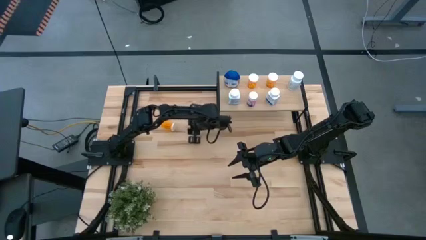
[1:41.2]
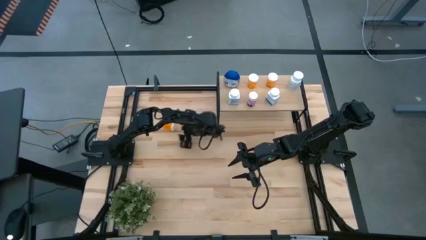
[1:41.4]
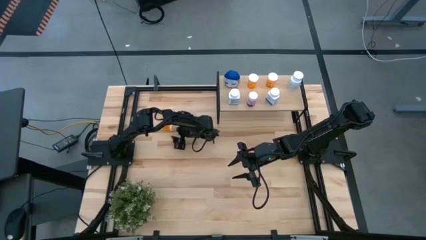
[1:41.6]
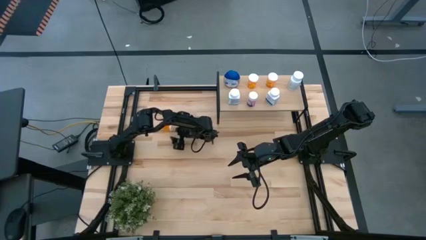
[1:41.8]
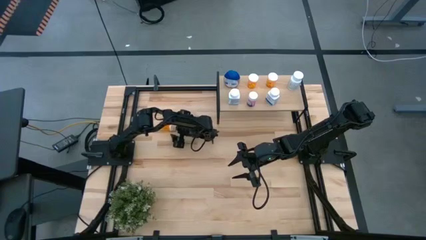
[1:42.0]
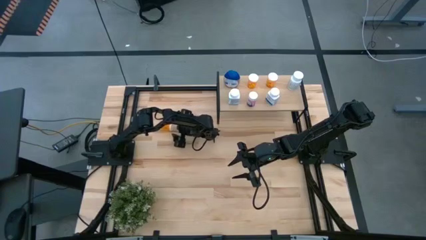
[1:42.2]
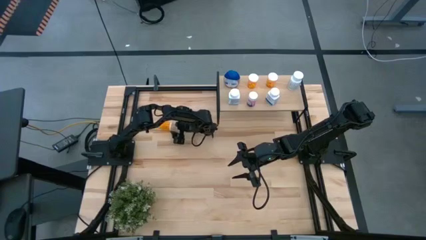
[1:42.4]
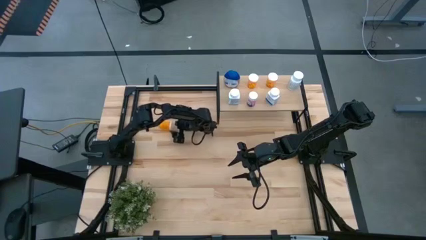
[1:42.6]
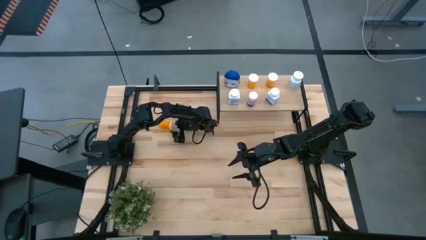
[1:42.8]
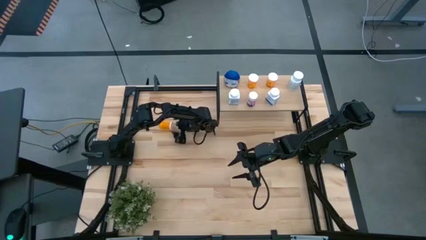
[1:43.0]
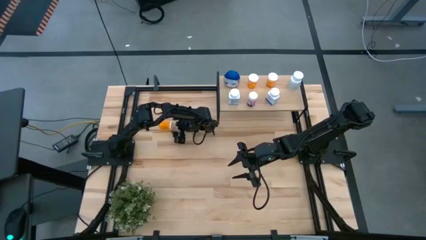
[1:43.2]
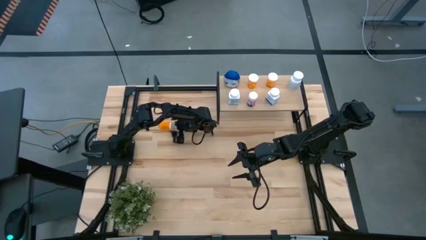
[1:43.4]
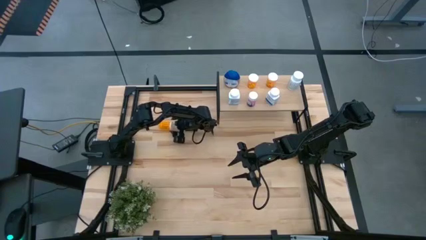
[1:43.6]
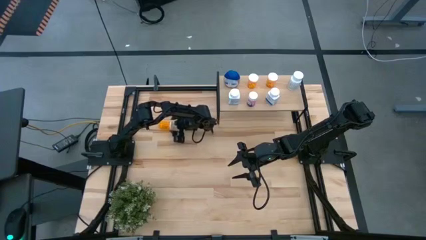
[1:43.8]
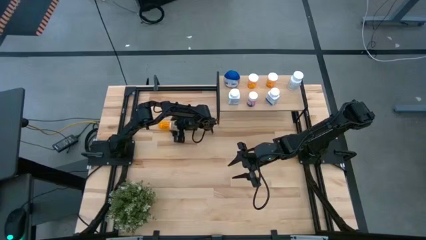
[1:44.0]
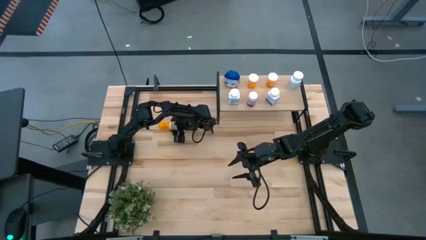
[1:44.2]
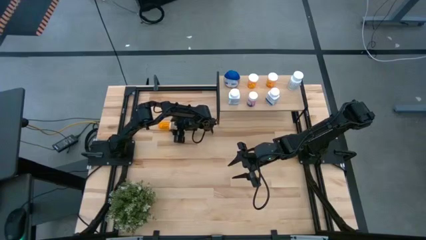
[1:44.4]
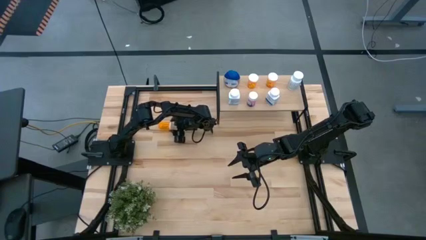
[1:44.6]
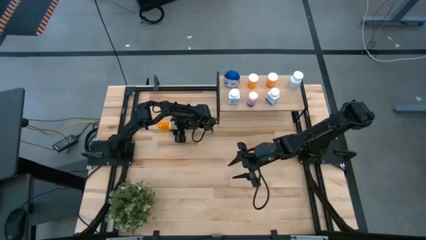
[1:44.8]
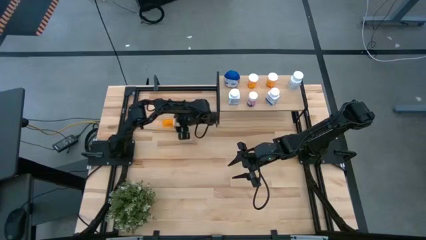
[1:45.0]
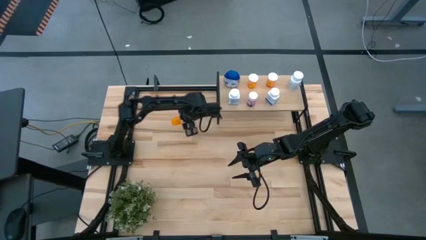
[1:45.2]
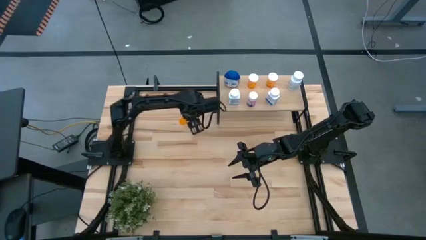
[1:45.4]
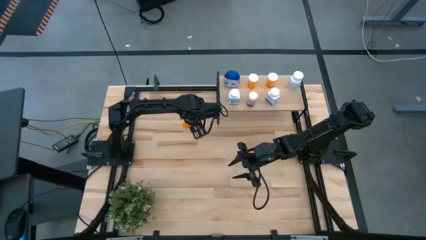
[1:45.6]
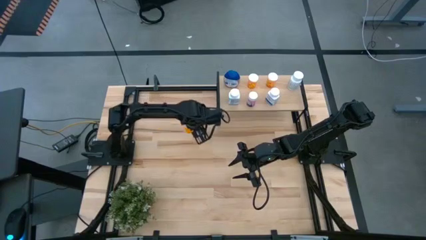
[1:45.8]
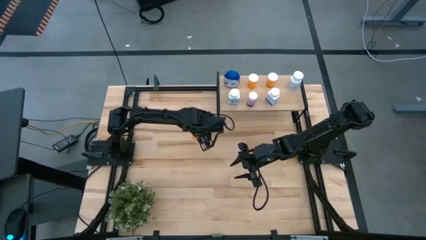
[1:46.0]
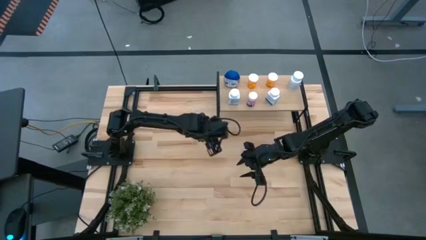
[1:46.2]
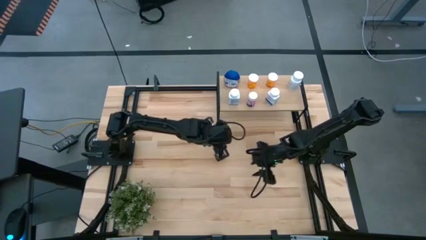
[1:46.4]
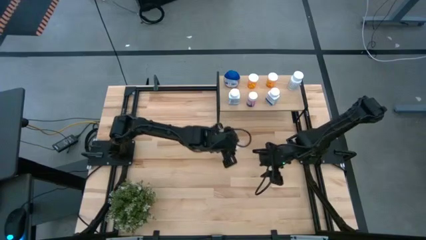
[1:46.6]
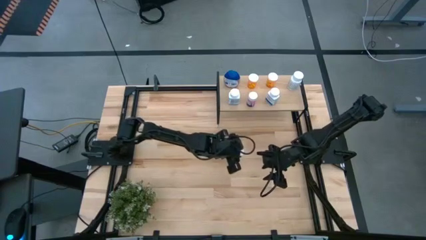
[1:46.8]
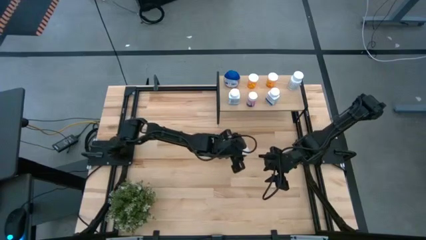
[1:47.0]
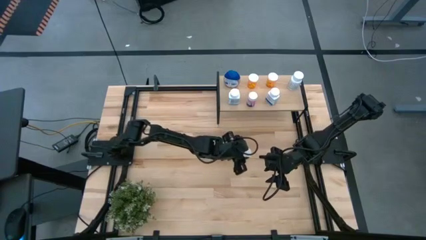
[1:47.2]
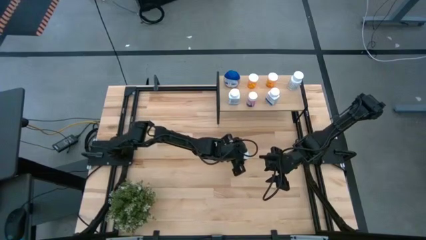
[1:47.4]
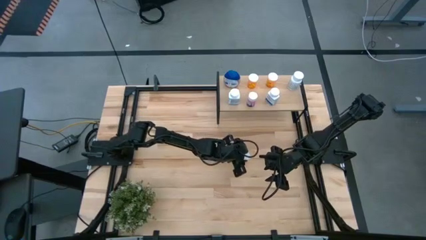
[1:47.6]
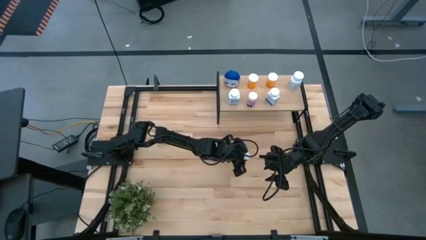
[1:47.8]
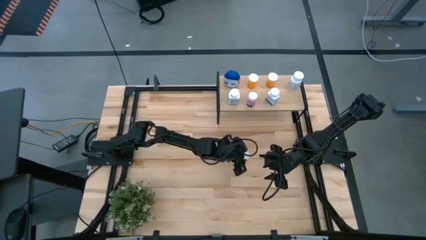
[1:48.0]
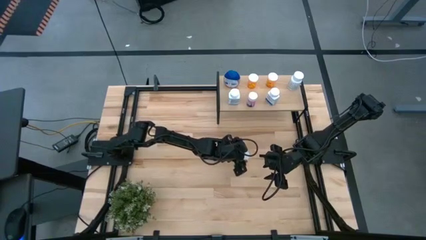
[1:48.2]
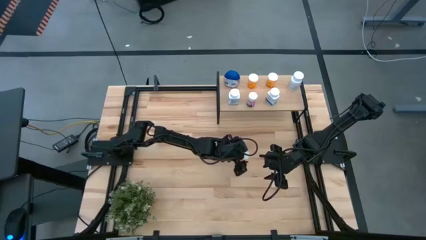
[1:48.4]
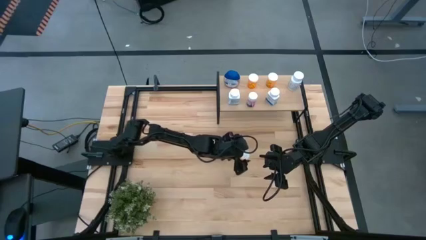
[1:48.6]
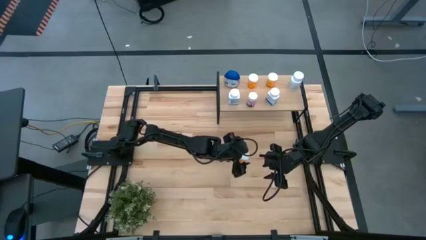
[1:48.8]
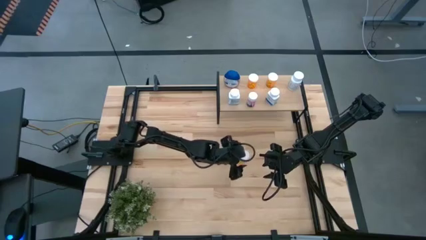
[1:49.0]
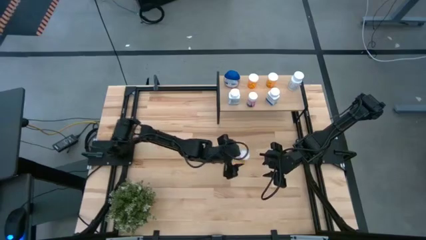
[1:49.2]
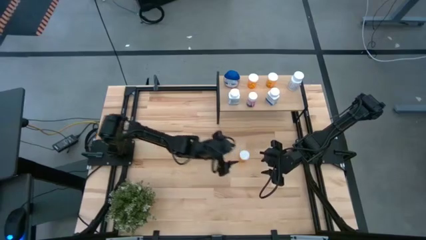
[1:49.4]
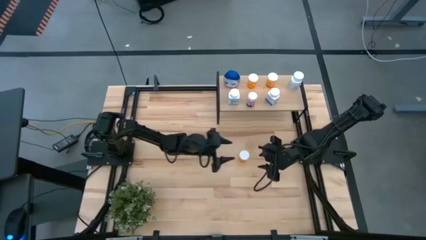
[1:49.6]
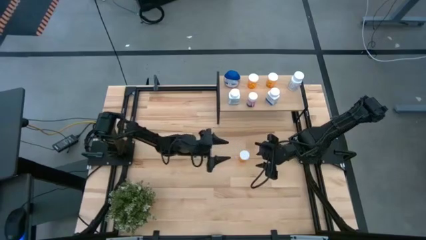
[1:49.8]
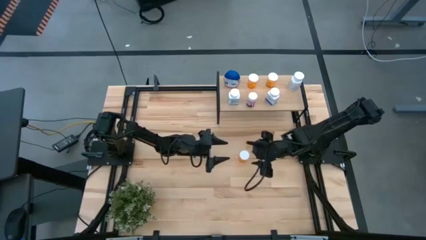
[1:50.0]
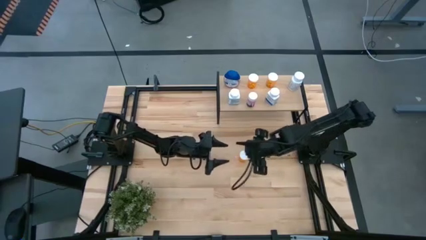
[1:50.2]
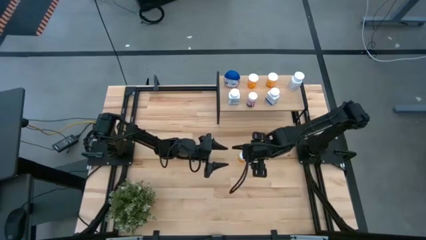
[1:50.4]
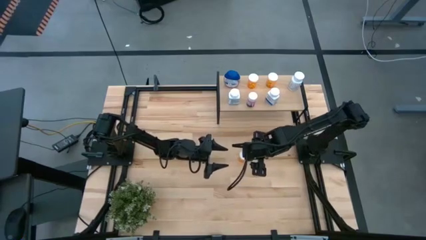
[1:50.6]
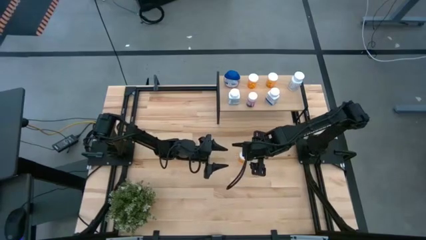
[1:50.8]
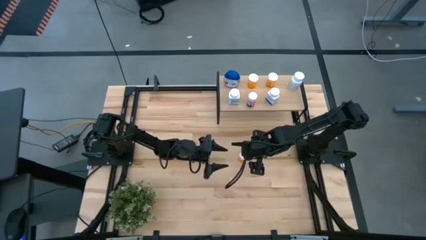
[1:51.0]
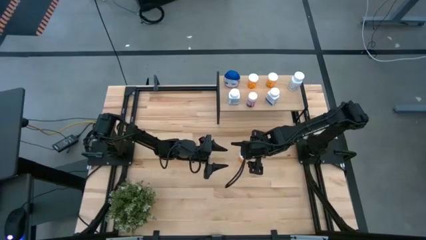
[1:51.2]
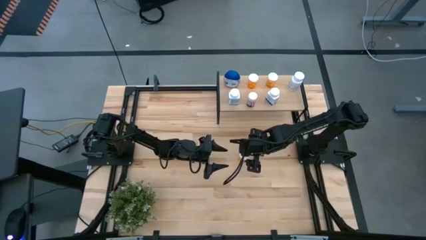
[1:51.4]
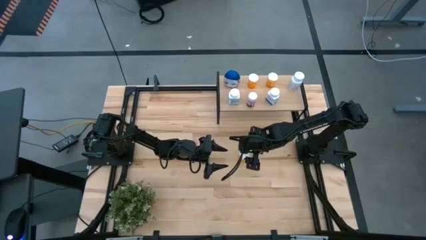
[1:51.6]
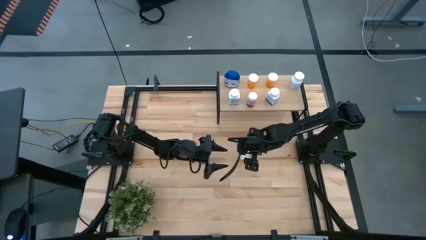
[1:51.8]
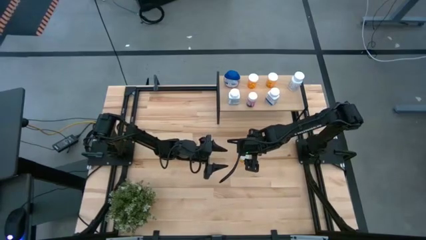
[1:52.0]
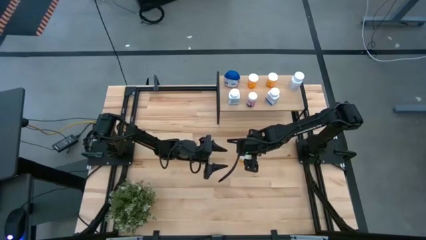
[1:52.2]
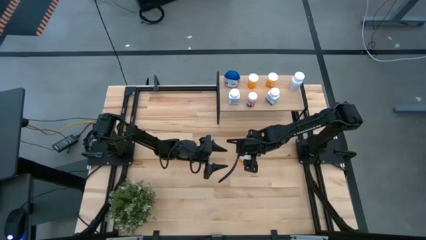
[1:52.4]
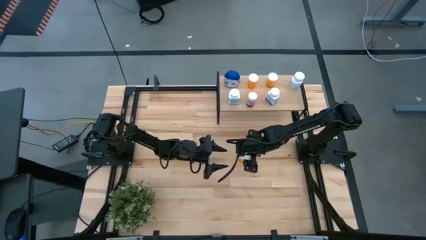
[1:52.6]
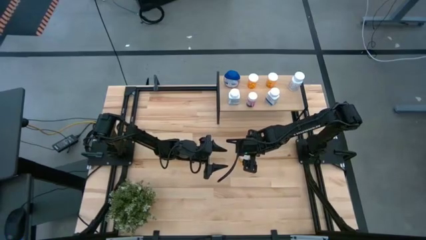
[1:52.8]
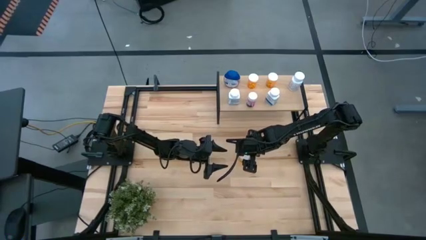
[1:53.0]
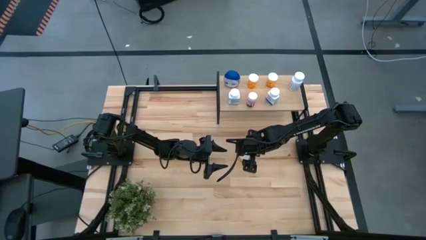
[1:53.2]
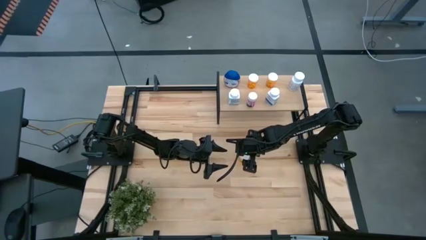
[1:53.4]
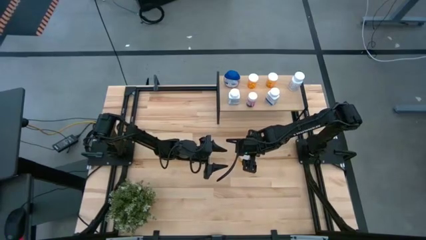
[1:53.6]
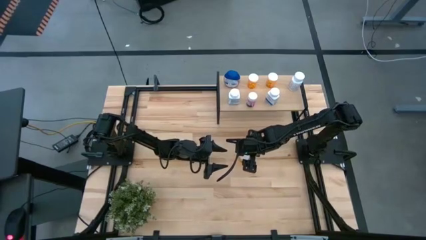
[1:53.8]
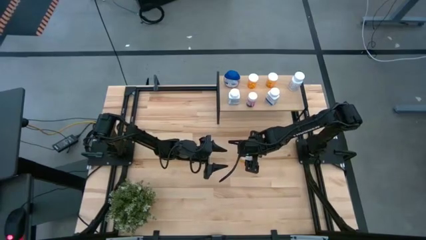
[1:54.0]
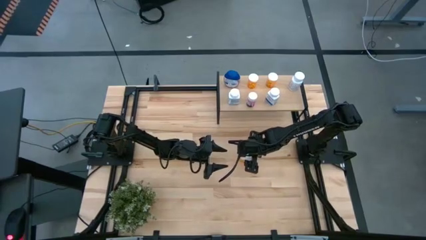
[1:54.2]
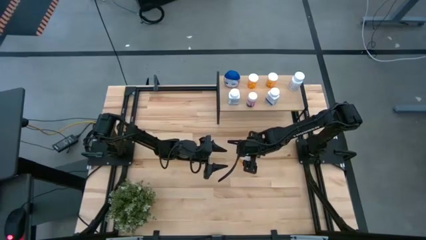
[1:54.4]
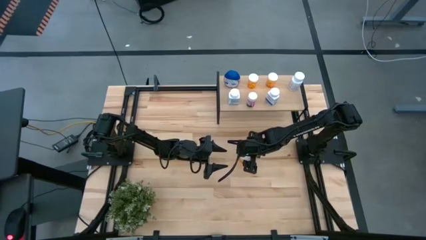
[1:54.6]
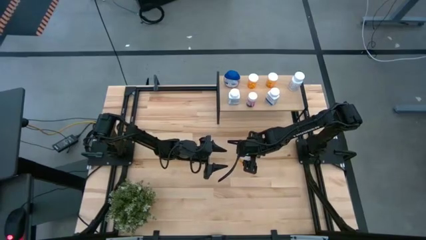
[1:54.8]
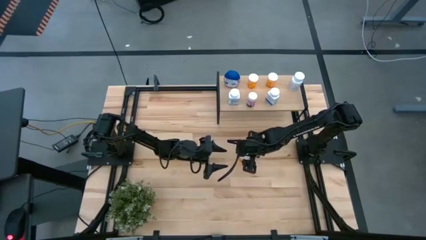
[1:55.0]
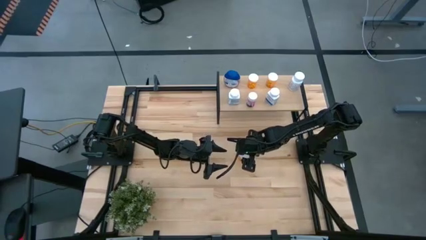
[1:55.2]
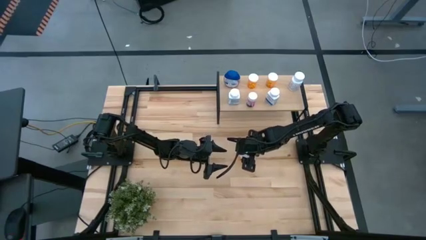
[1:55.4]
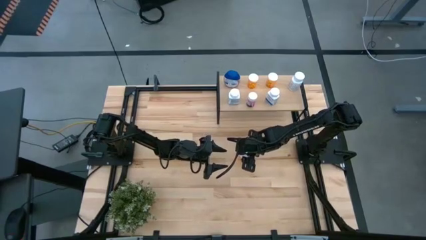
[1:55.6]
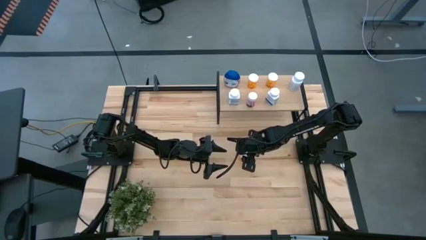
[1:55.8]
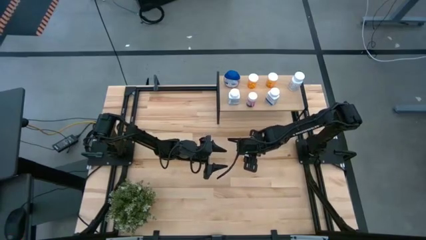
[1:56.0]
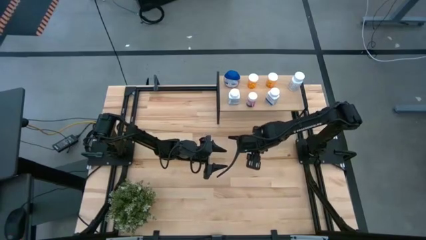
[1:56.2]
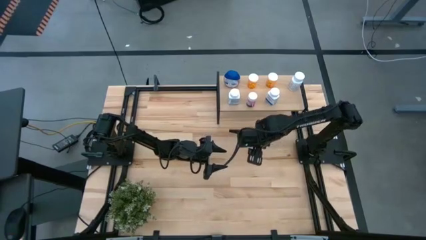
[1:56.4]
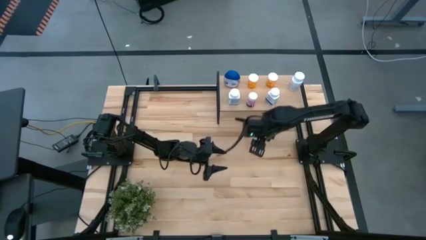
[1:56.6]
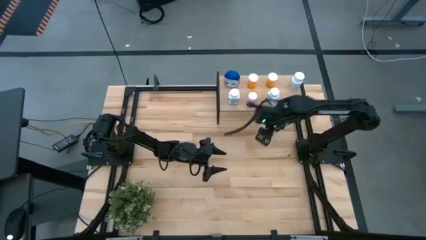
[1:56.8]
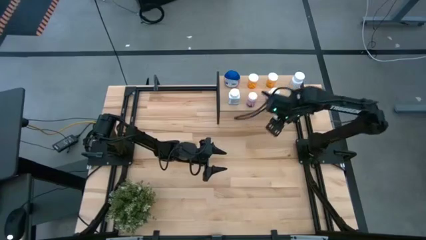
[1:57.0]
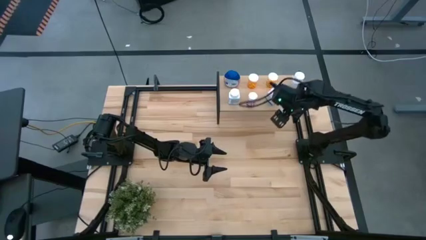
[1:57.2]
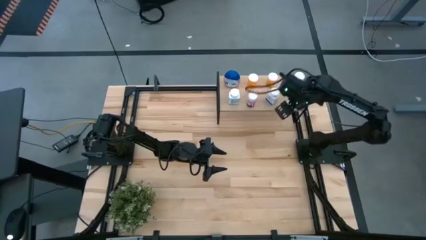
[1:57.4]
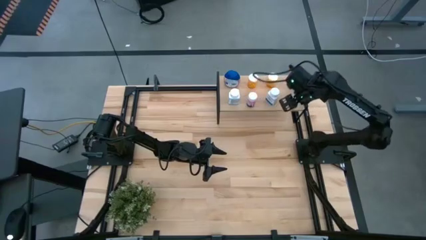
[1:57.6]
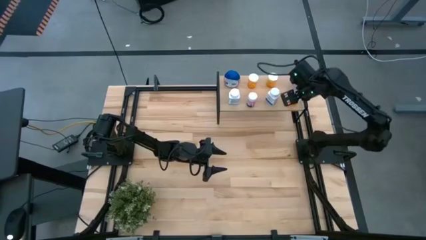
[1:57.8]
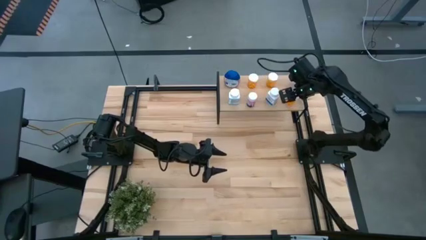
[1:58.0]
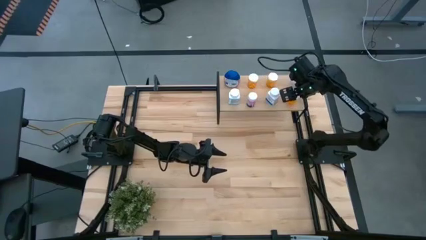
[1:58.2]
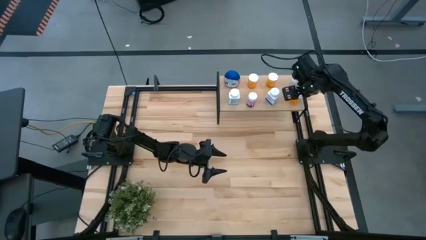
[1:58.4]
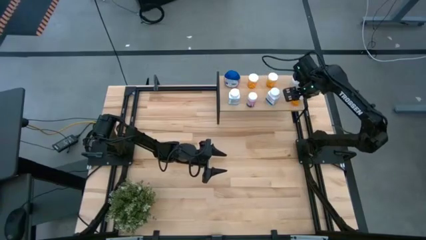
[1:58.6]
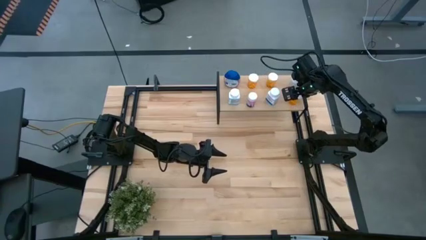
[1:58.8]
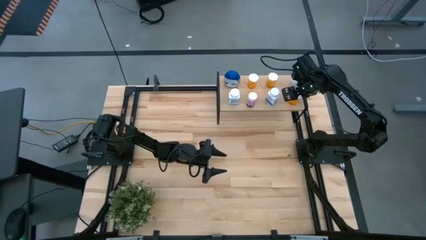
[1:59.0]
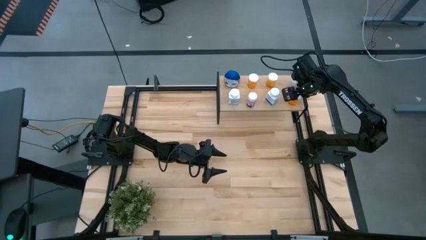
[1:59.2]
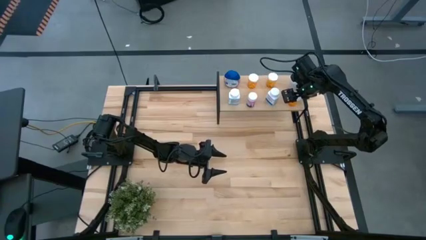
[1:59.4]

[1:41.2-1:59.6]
Task: Pick and place medicine bottles onto shelf by color
Put the orange pill bottle on the shelf
